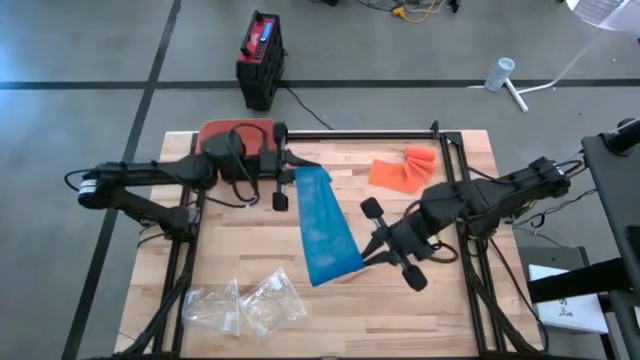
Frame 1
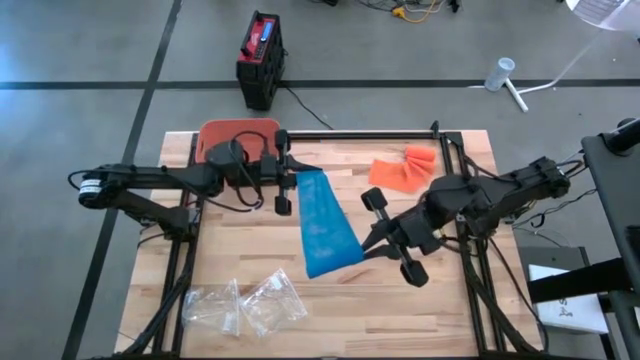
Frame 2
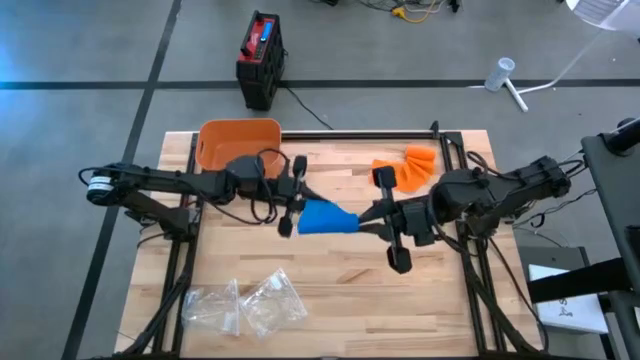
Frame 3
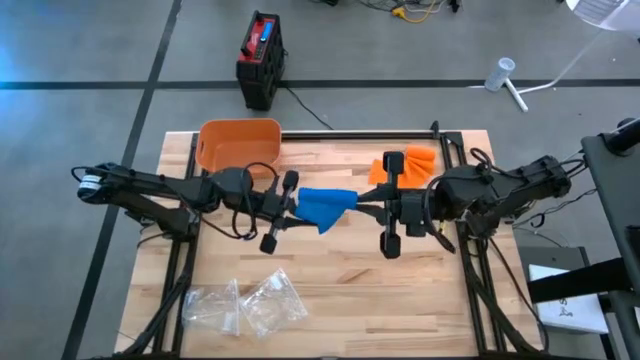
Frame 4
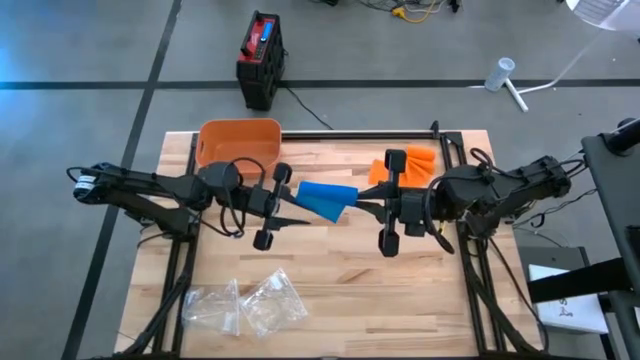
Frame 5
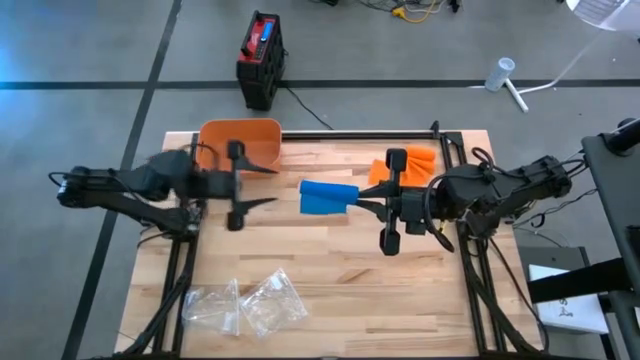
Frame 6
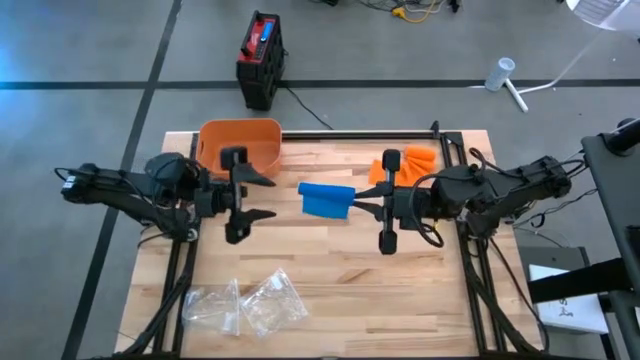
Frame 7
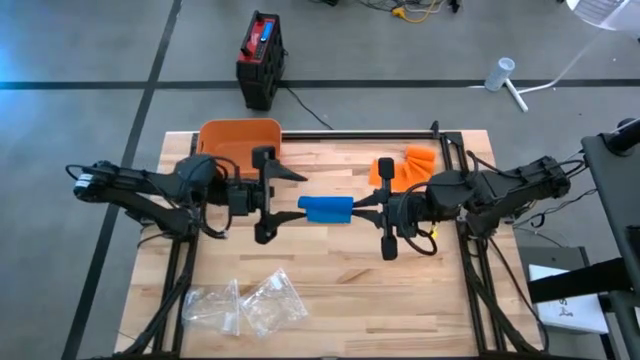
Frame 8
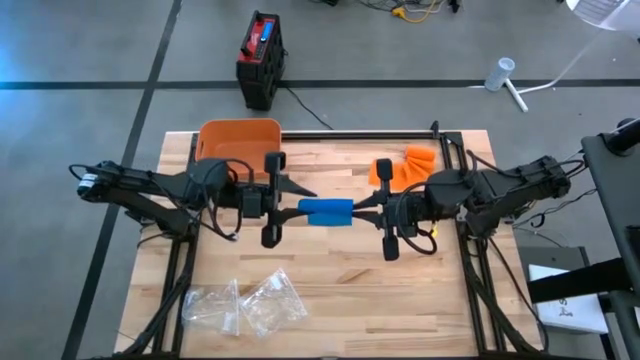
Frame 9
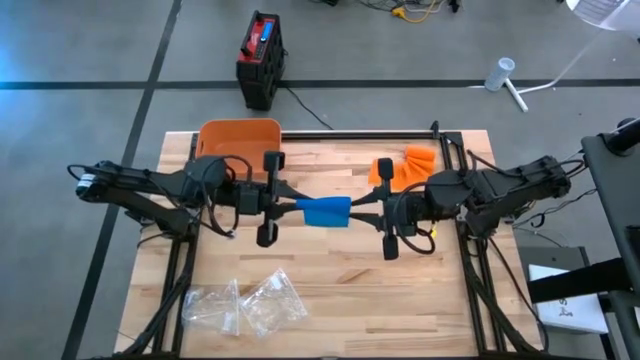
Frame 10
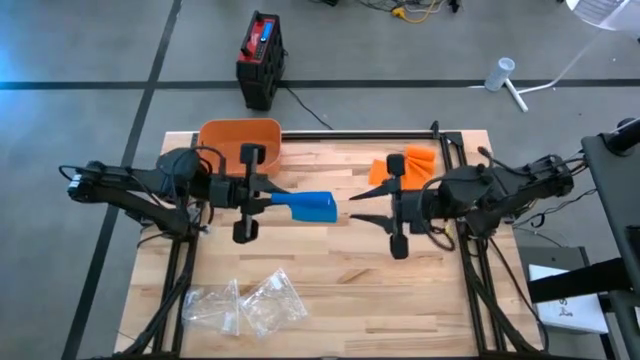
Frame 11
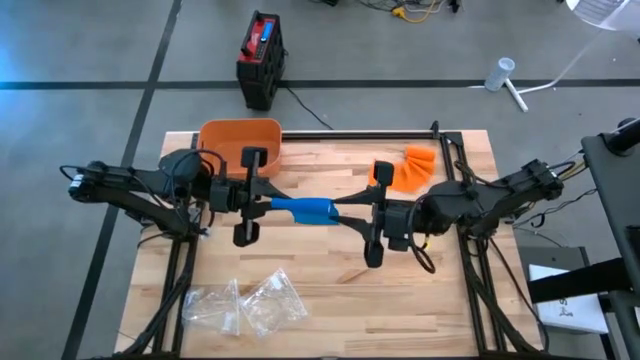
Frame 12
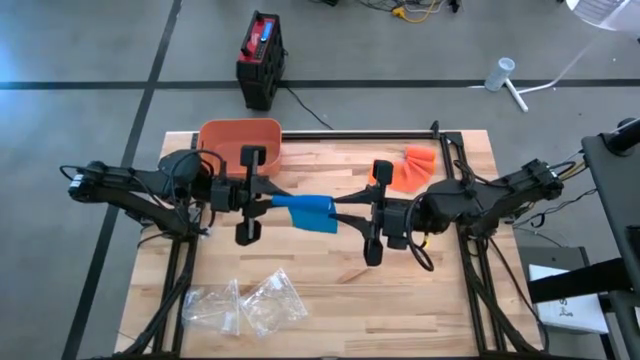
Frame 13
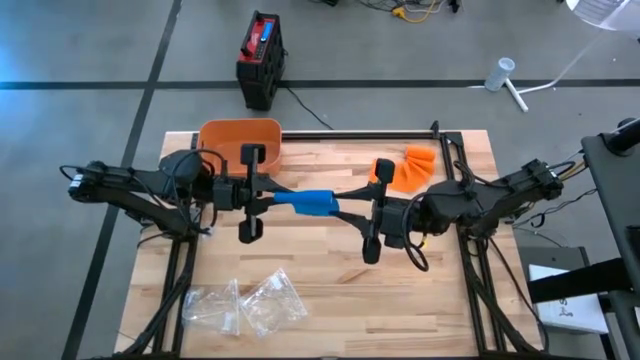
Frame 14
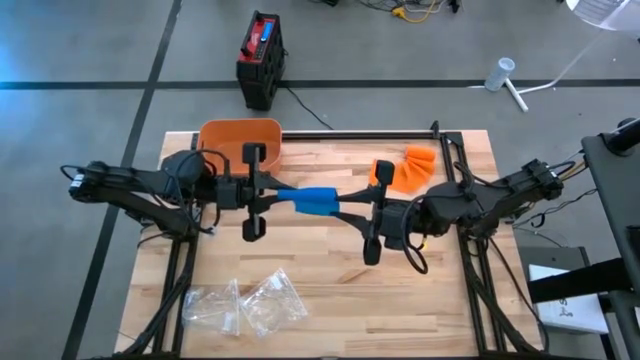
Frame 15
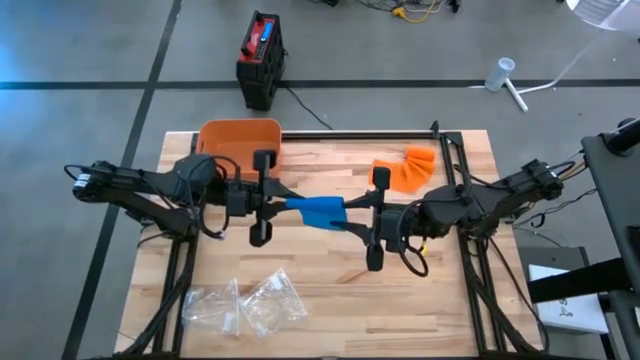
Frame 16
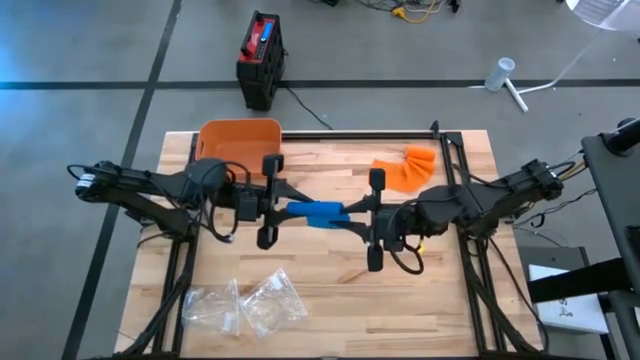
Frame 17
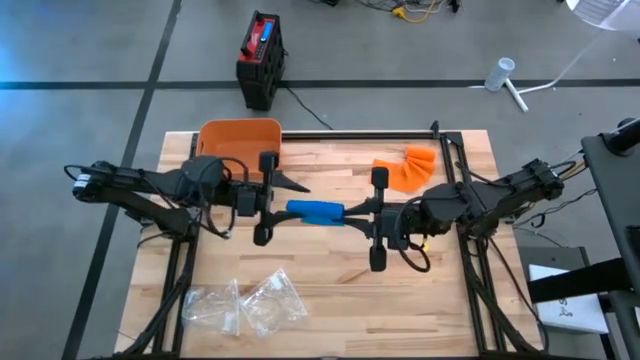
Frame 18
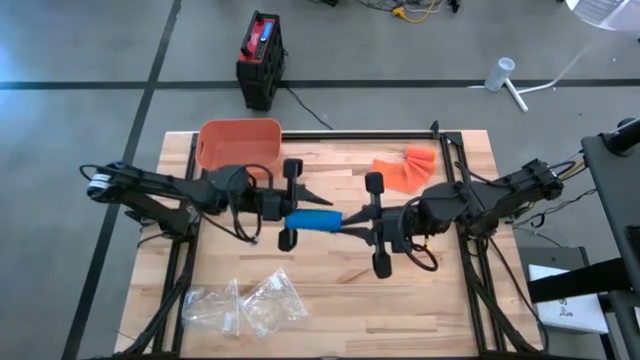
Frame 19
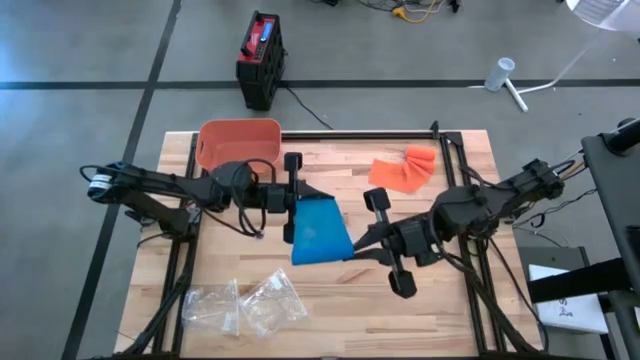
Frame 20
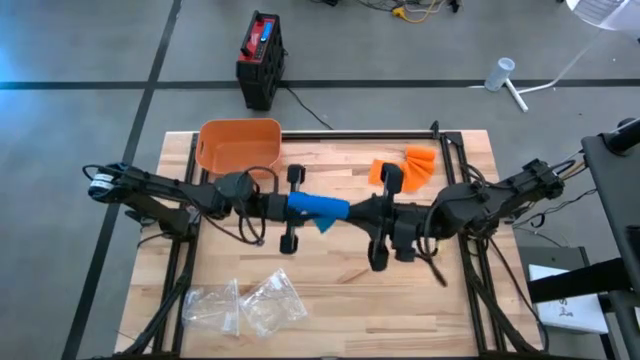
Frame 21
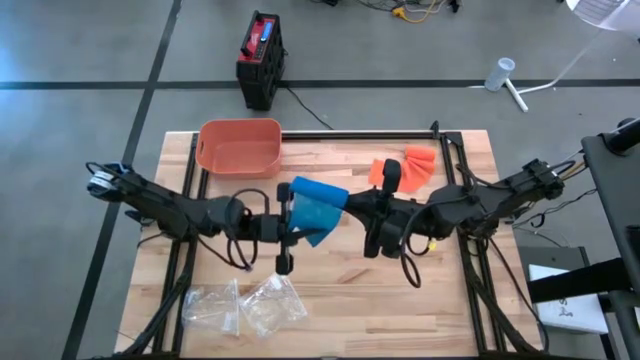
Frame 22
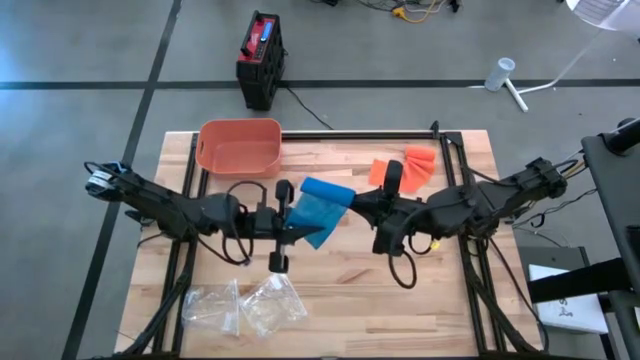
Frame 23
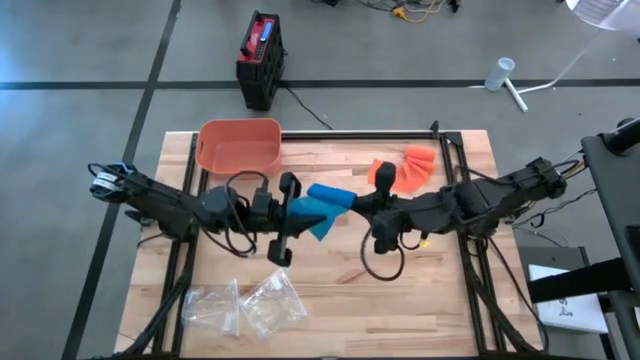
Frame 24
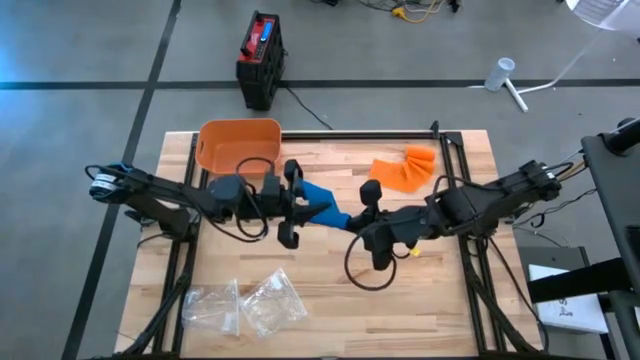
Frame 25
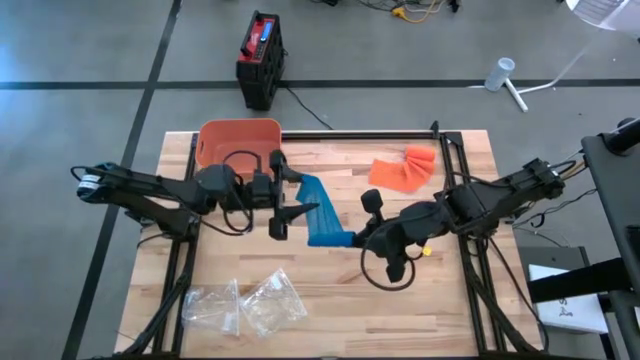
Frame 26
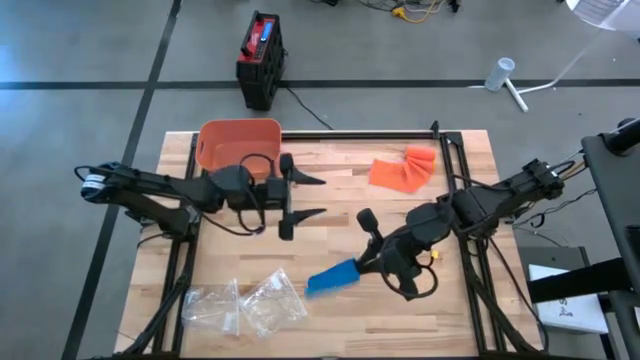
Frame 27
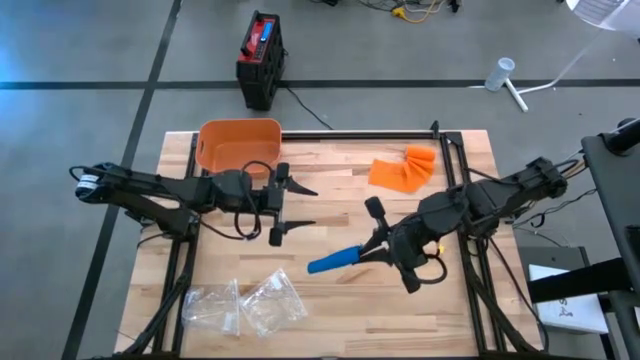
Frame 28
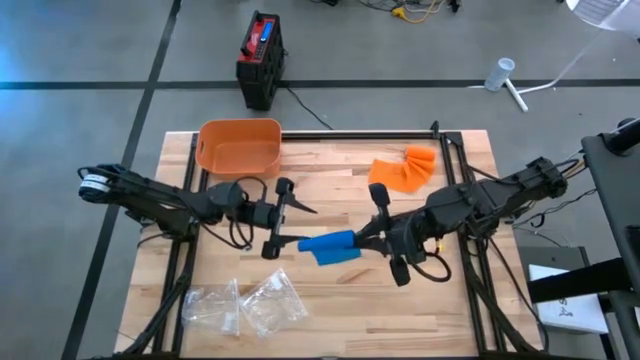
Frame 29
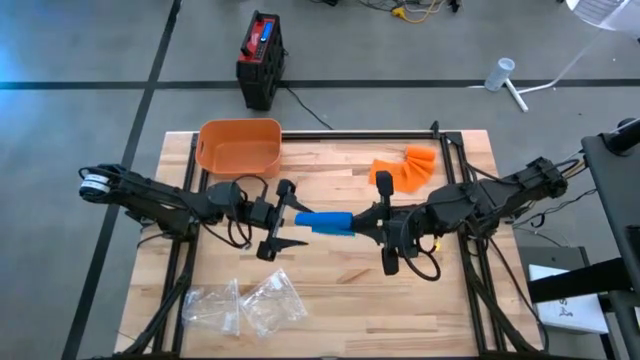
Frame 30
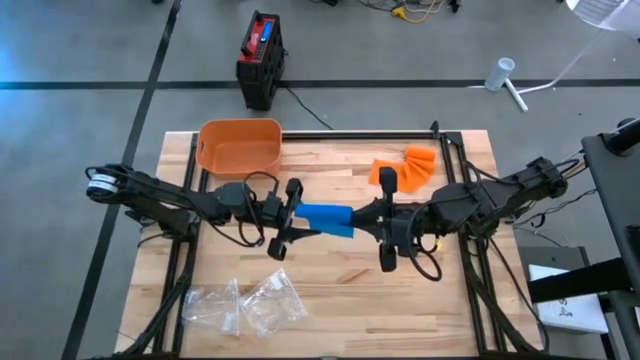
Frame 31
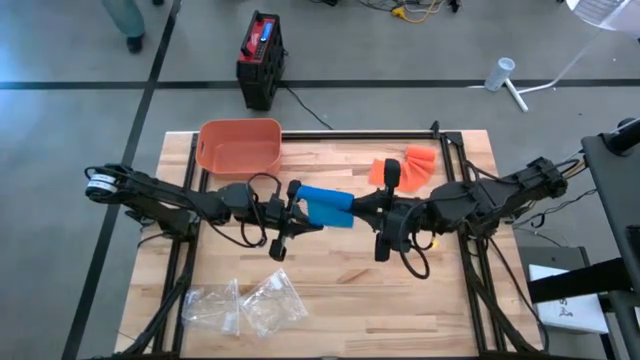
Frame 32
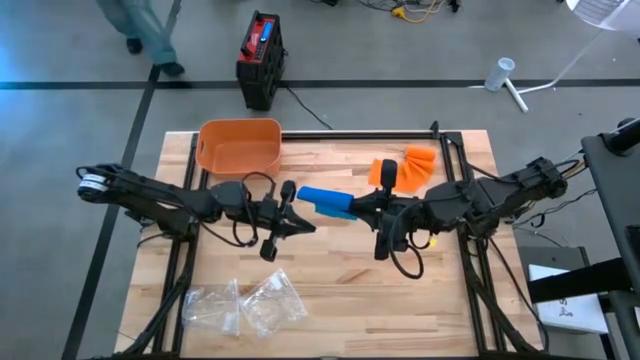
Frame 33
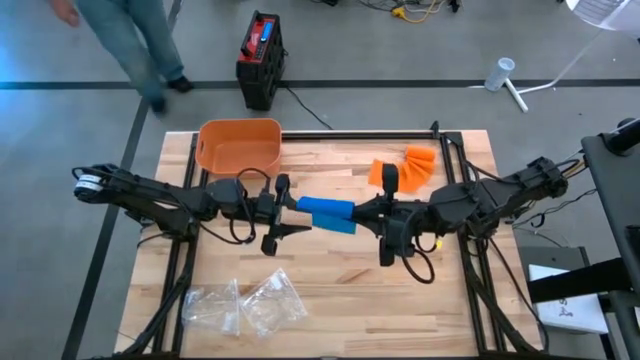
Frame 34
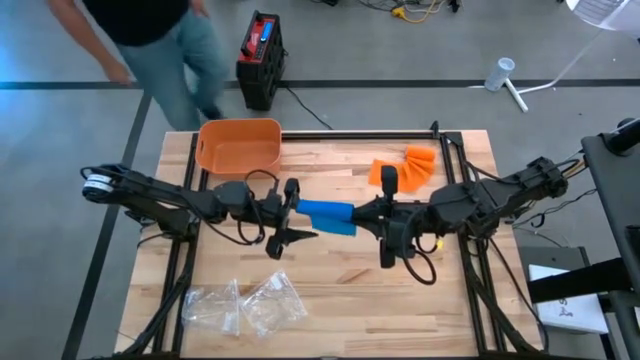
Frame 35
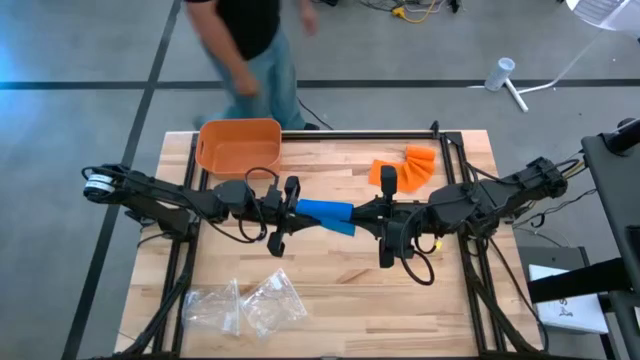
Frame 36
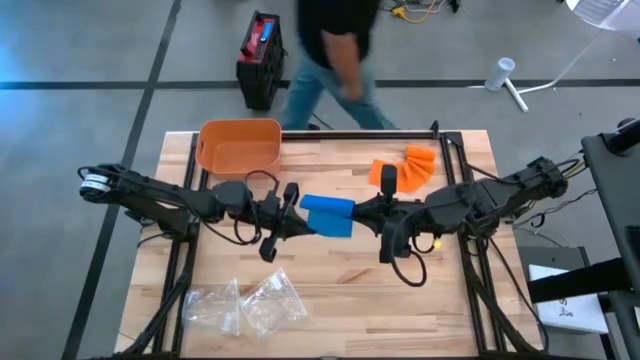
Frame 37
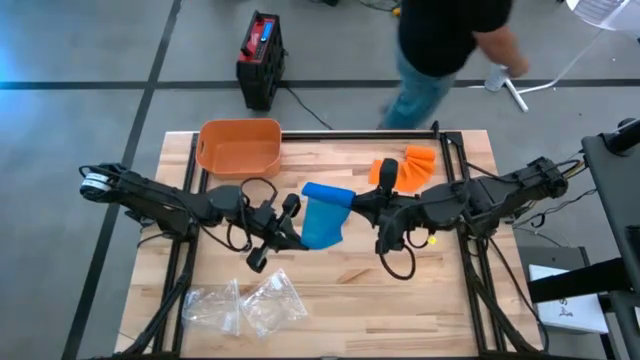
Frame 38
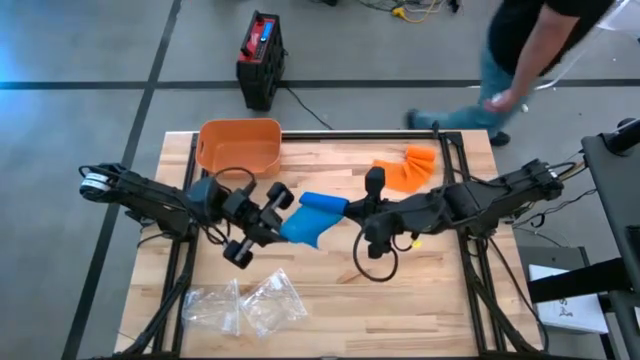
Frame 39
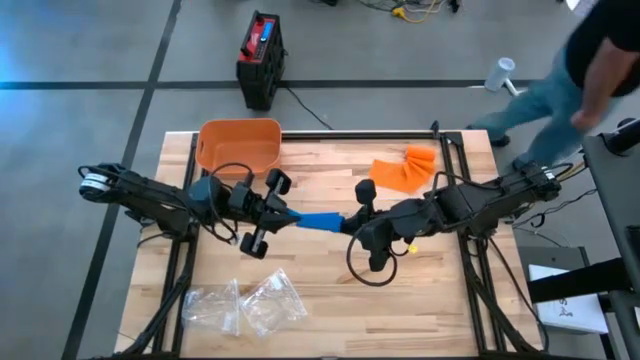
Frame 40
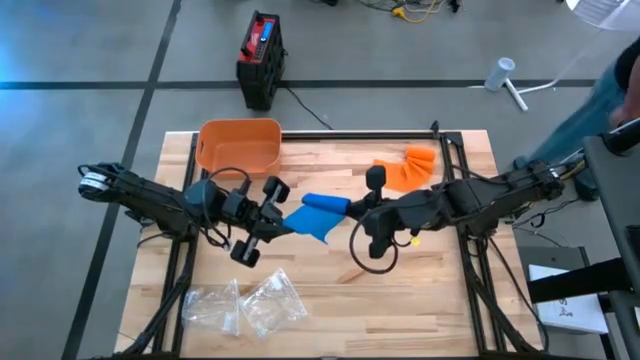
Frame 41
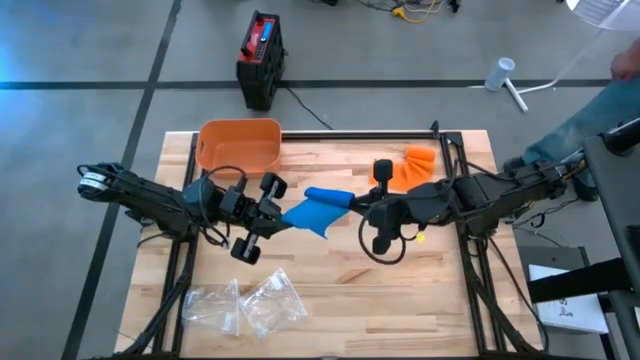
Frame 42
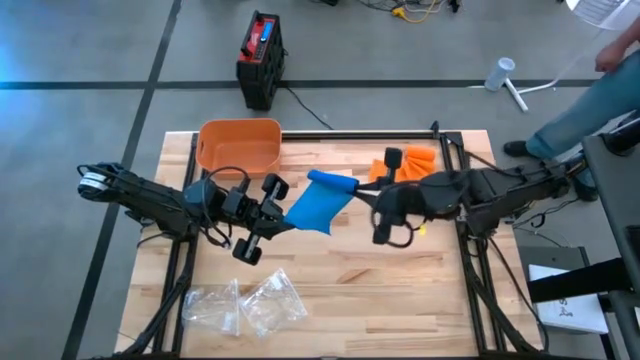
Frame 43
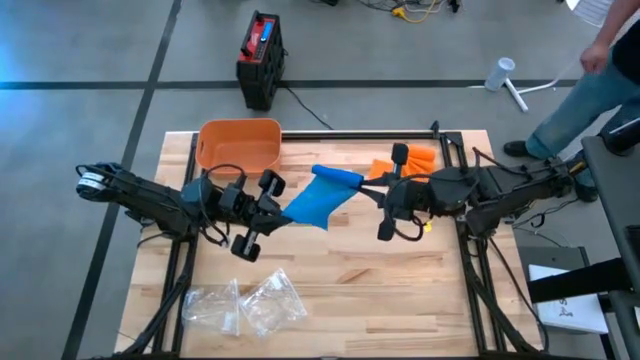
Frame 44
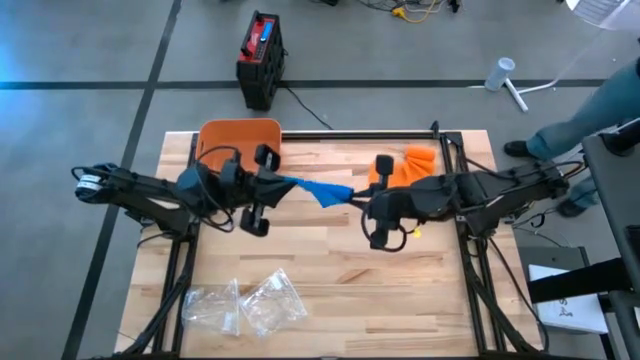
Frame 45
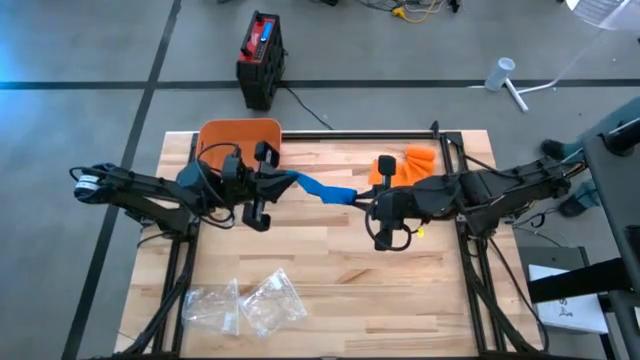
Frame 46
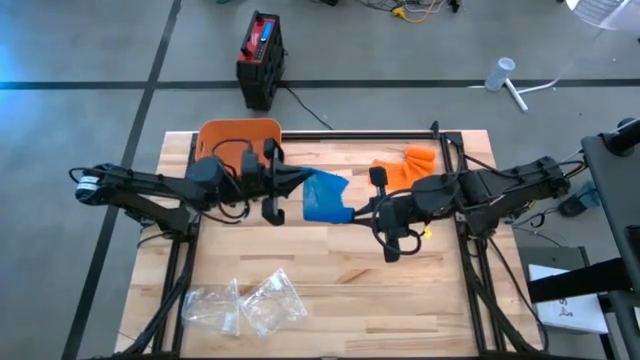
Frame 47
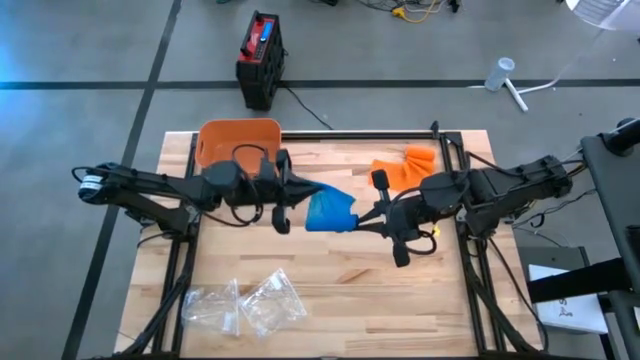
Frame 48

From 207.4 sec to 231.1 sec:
Task: Roll bandage
Roll the blue bandage
